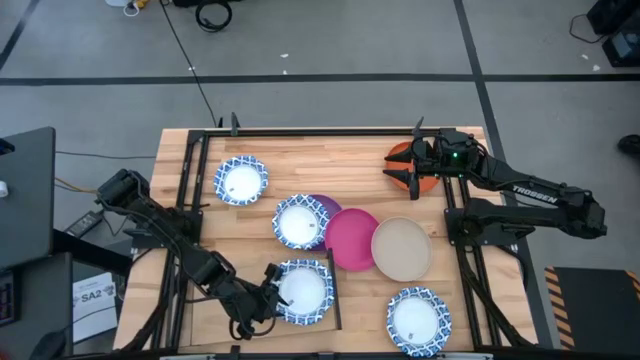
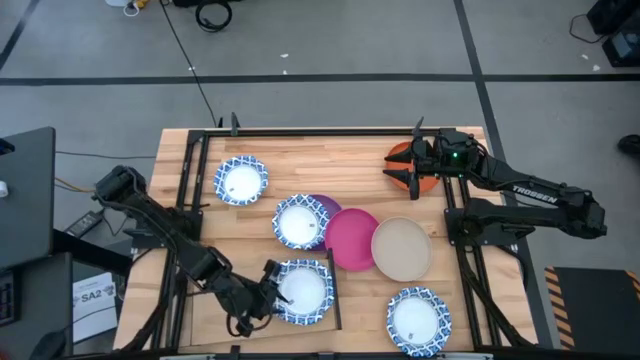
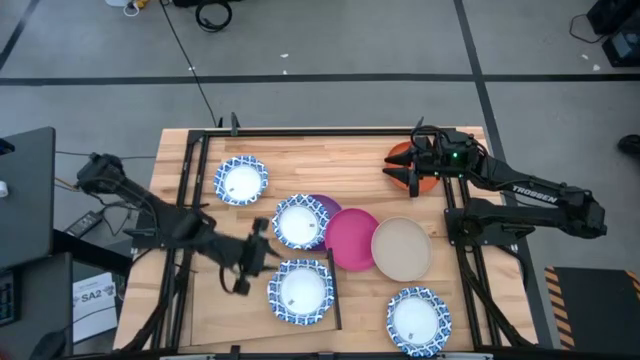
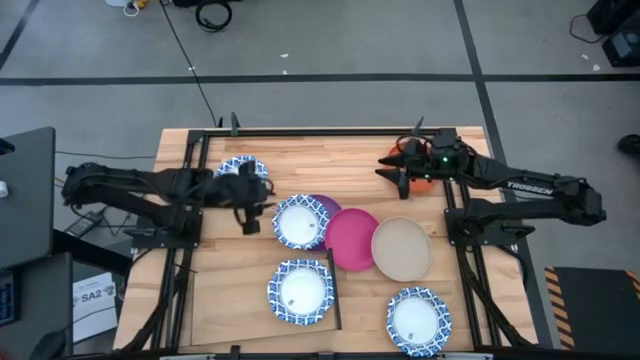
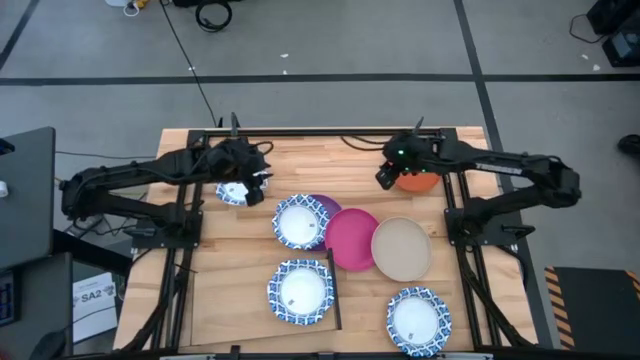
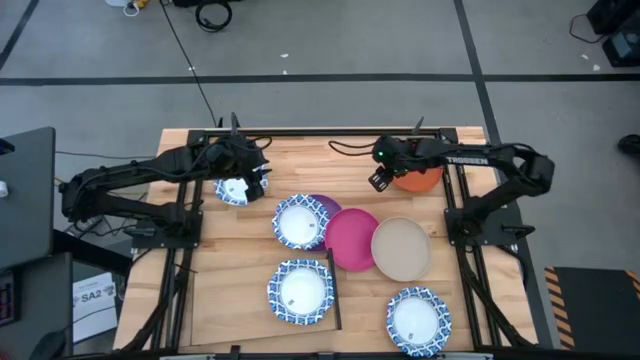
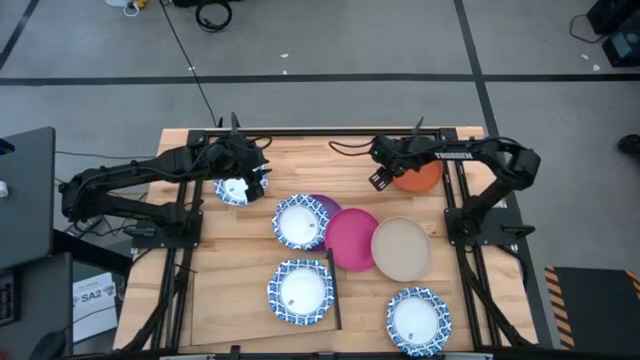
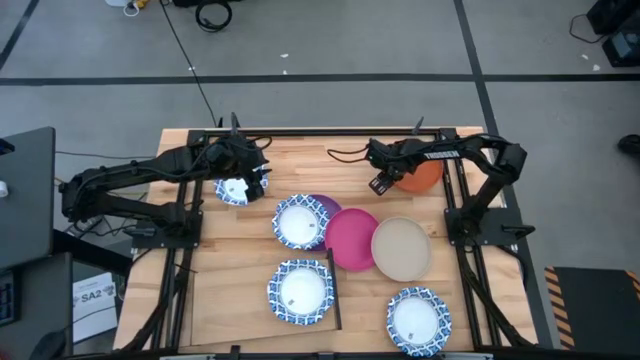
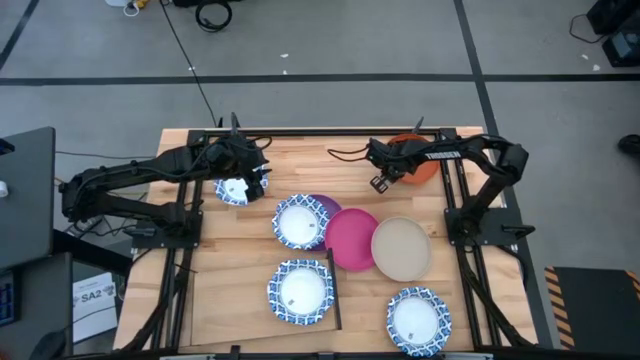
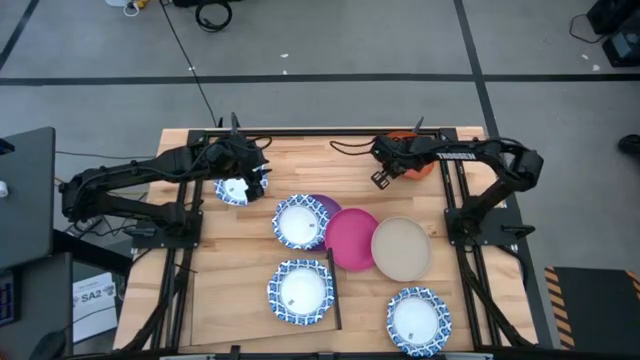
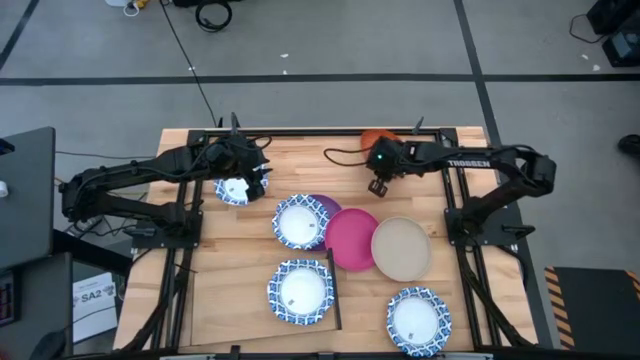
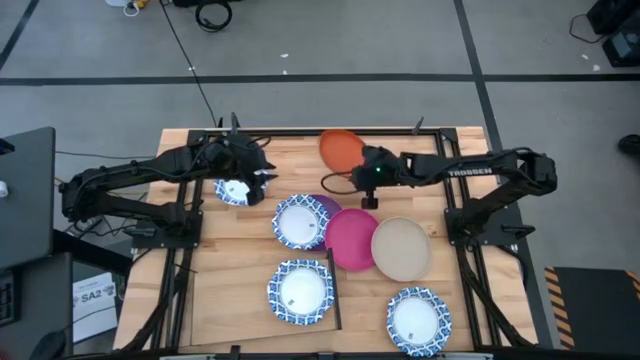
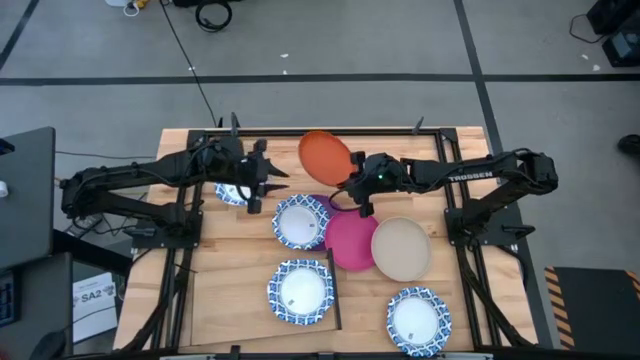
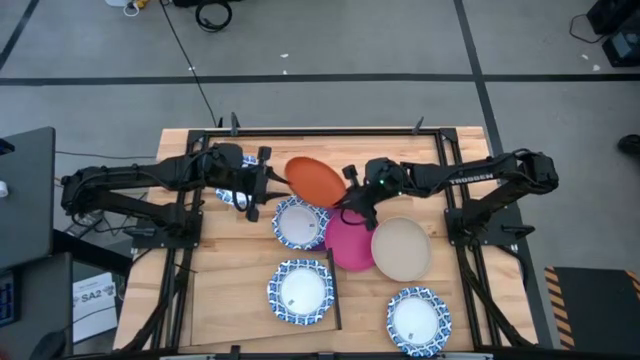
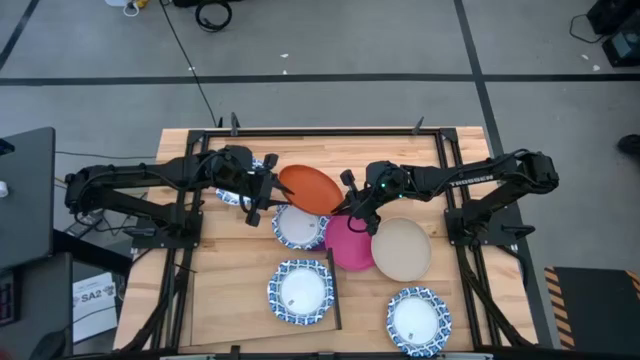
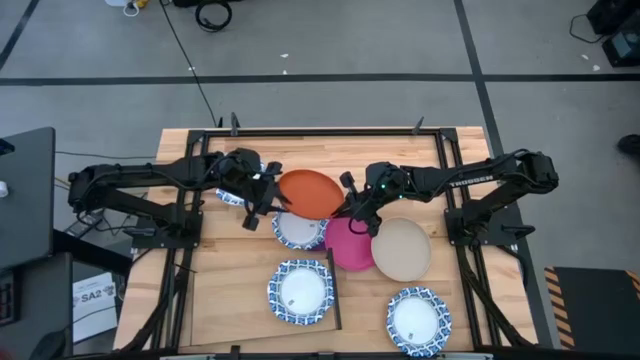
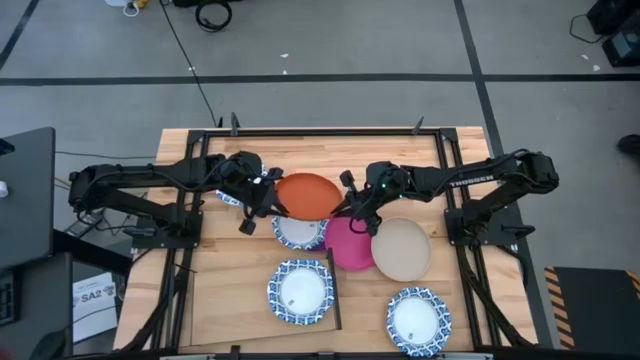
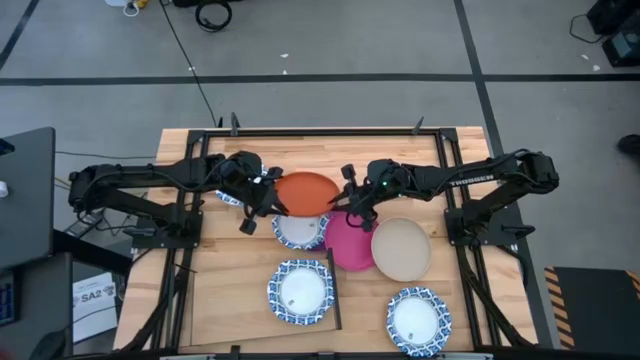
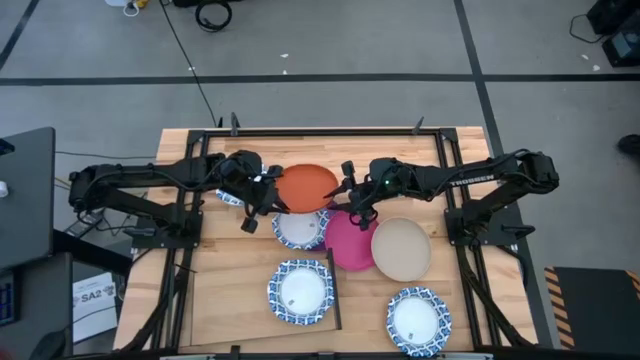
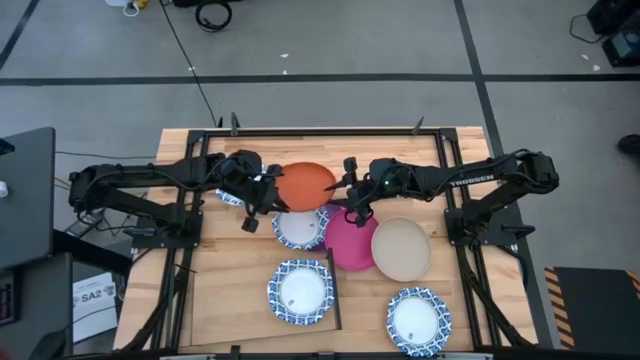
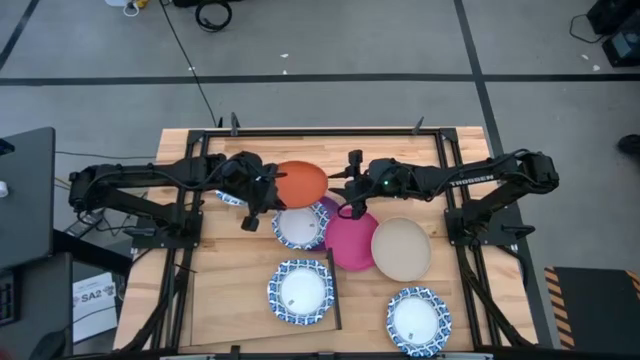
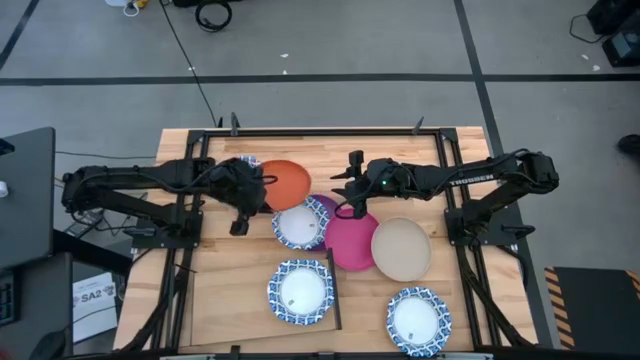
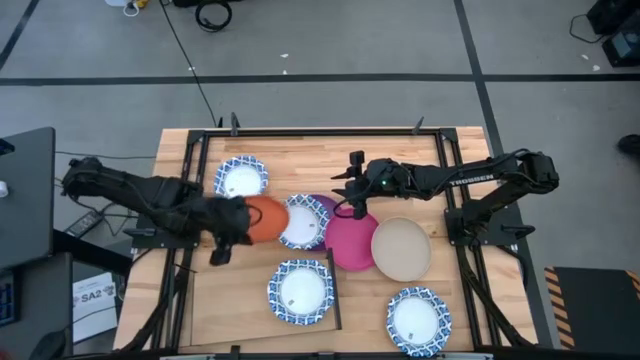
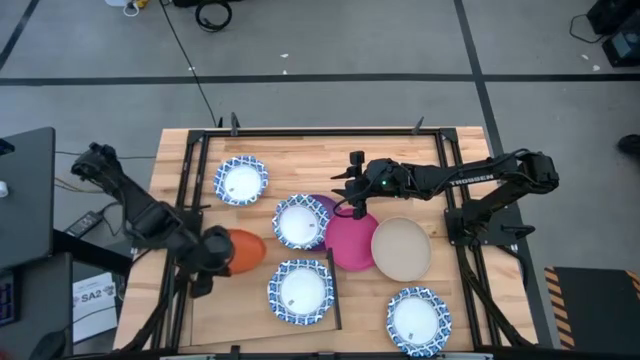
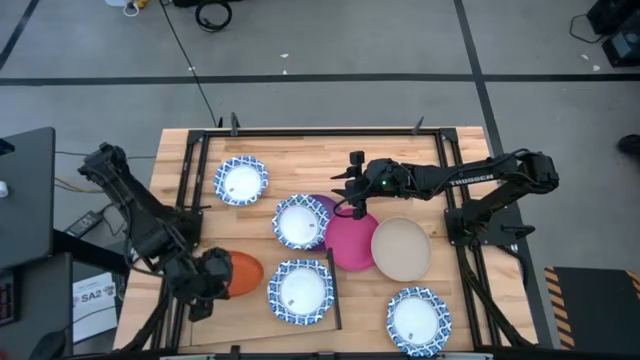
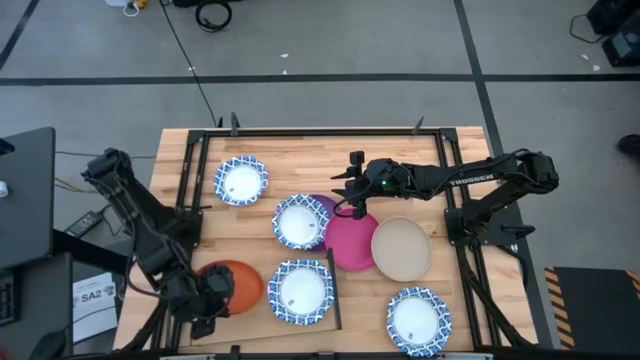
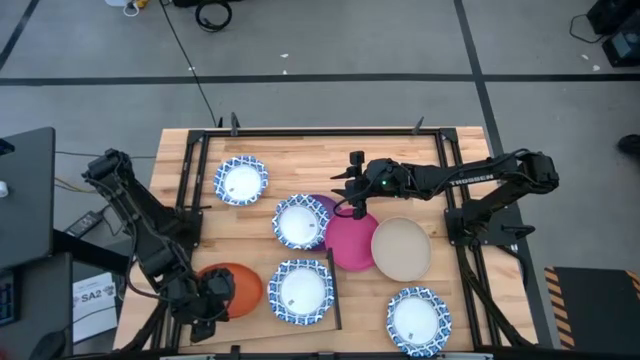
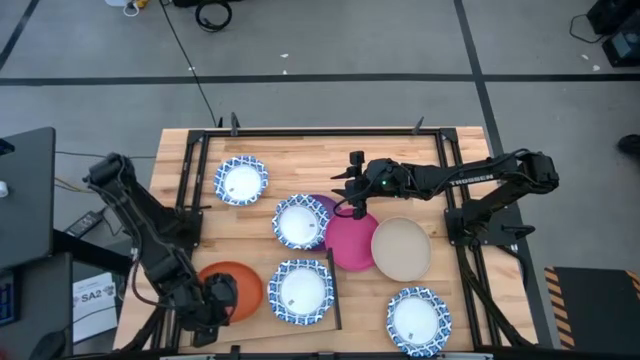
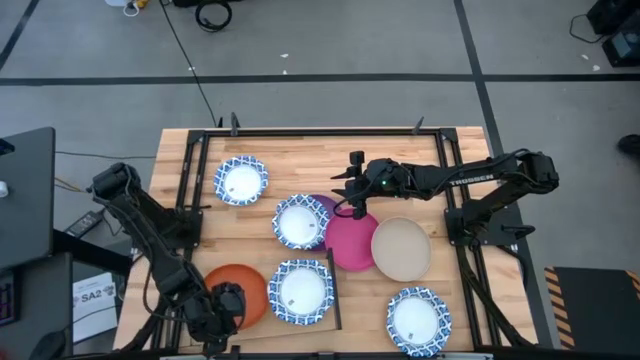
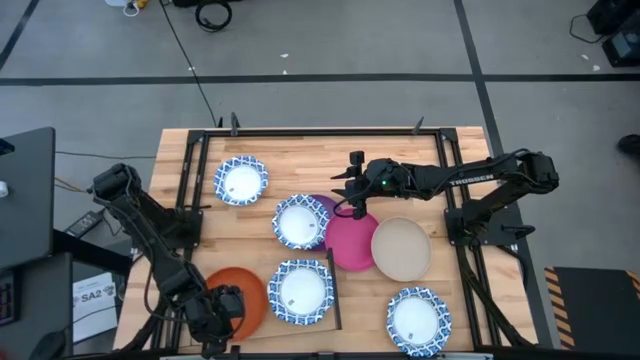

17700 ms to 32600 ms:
Task: Place and stack plates onto a shelf
Put the orange plate on the shelf
